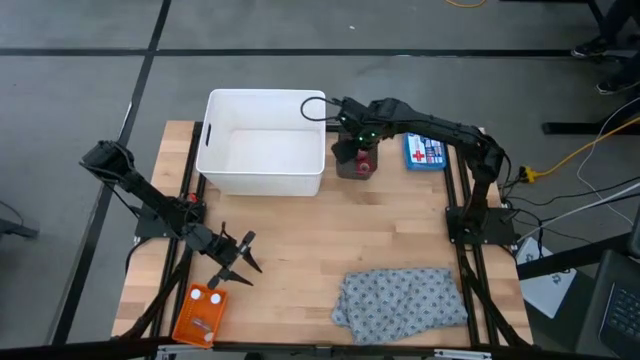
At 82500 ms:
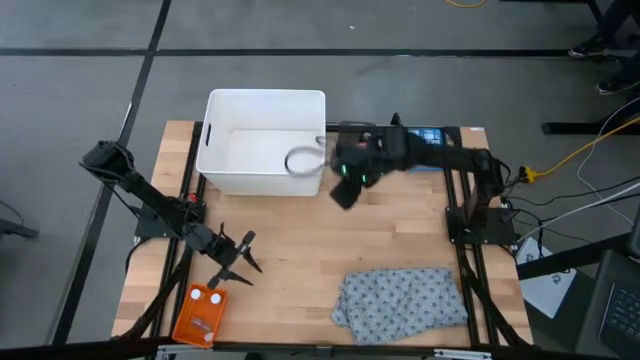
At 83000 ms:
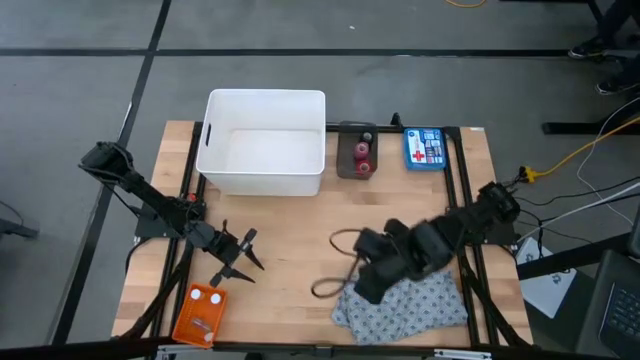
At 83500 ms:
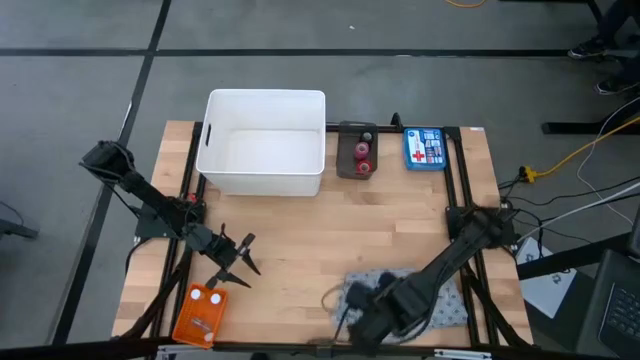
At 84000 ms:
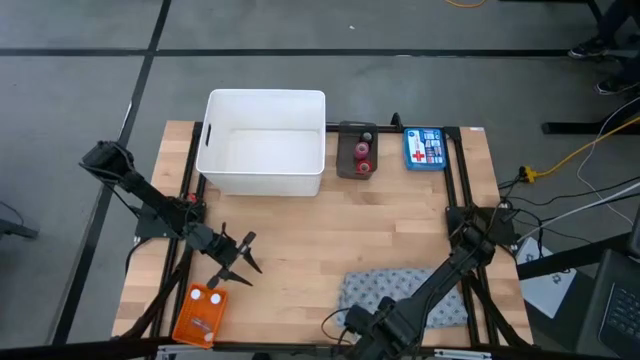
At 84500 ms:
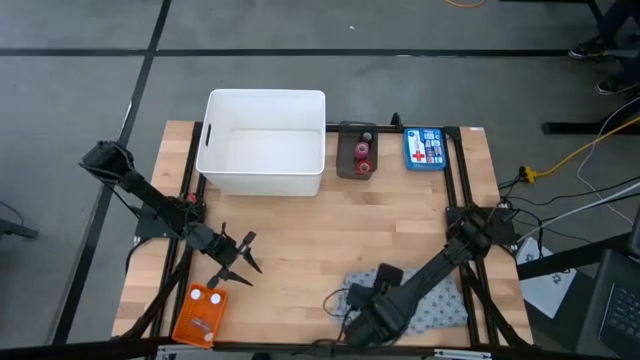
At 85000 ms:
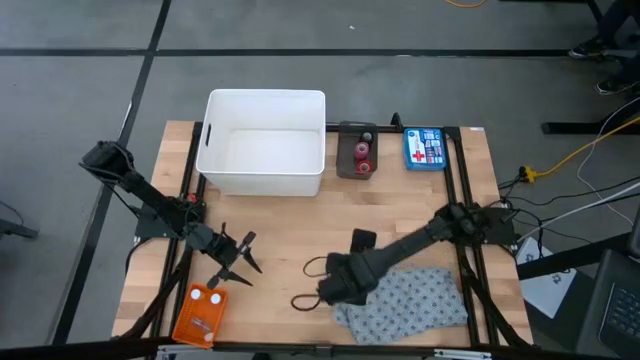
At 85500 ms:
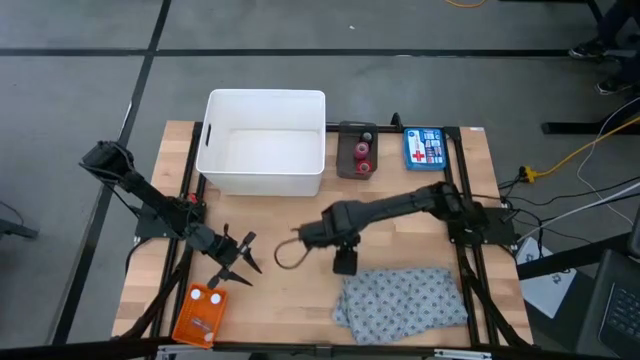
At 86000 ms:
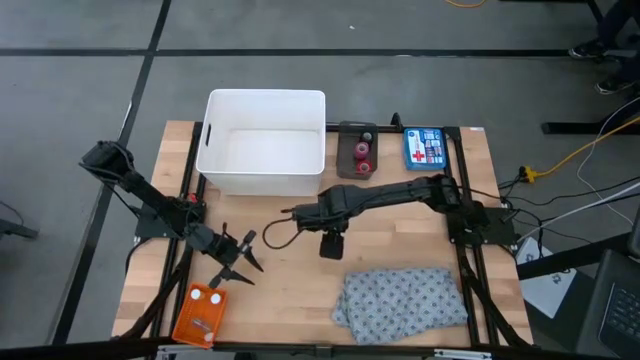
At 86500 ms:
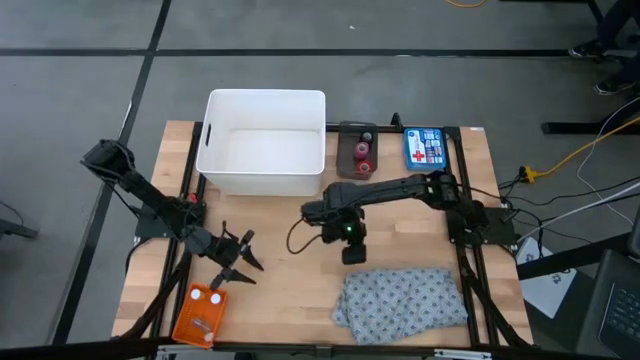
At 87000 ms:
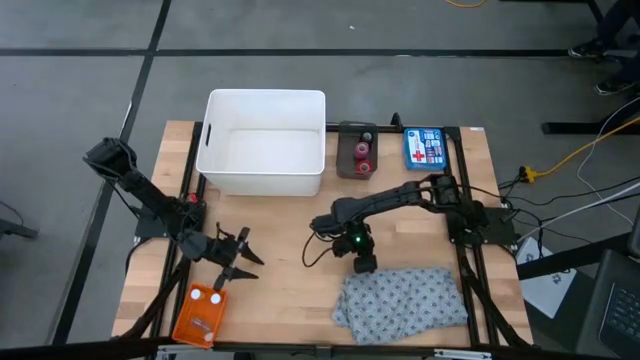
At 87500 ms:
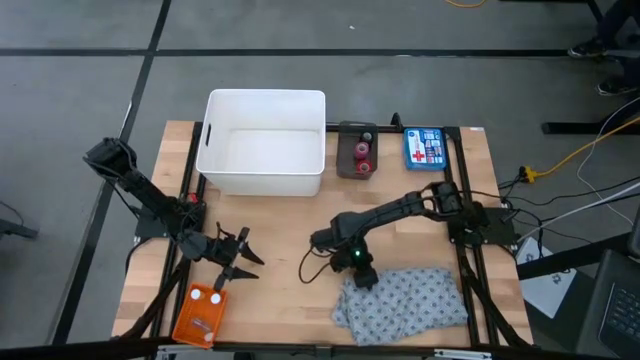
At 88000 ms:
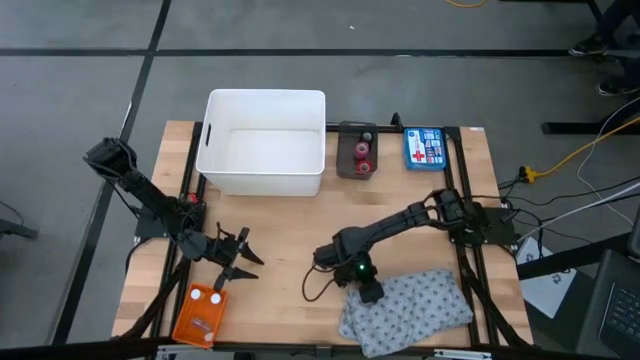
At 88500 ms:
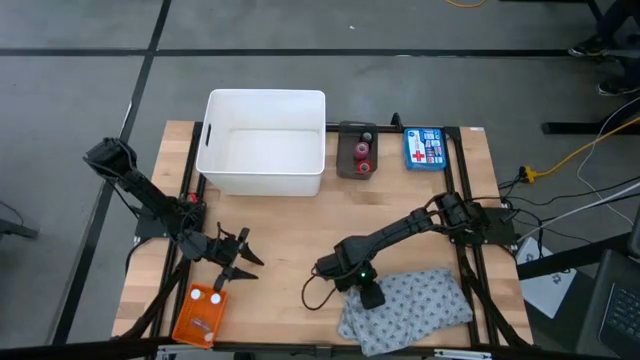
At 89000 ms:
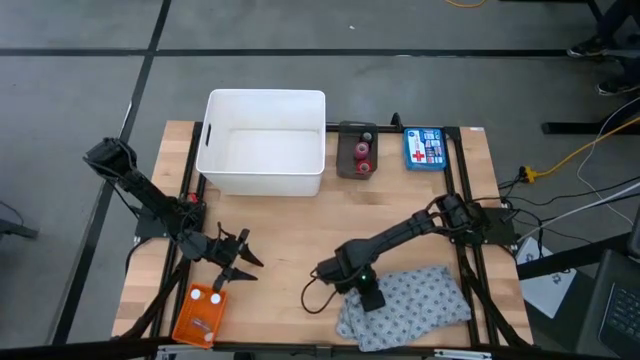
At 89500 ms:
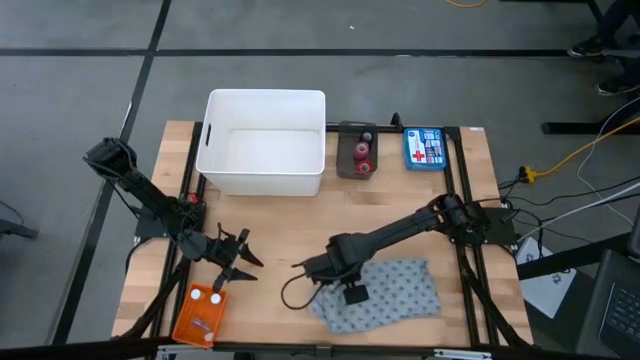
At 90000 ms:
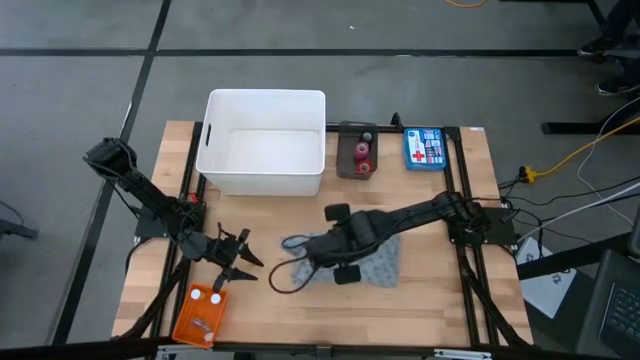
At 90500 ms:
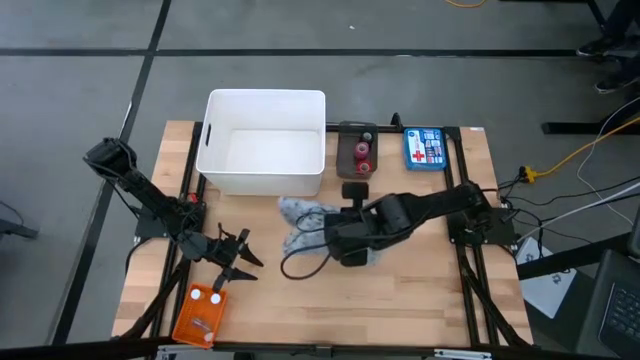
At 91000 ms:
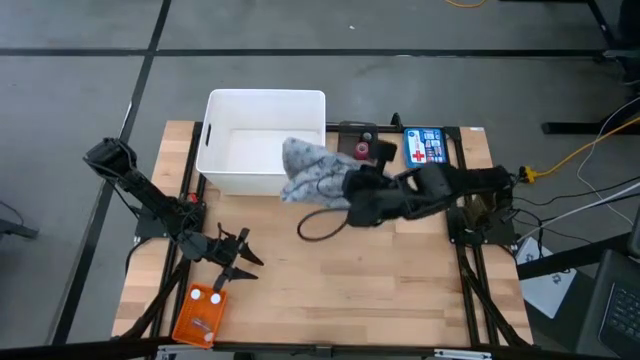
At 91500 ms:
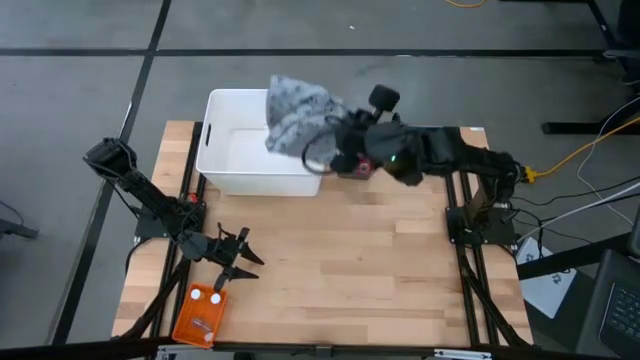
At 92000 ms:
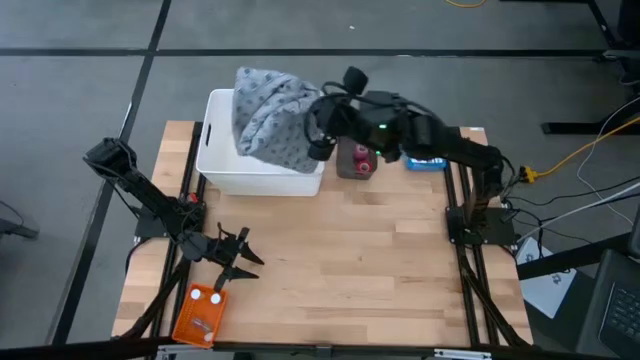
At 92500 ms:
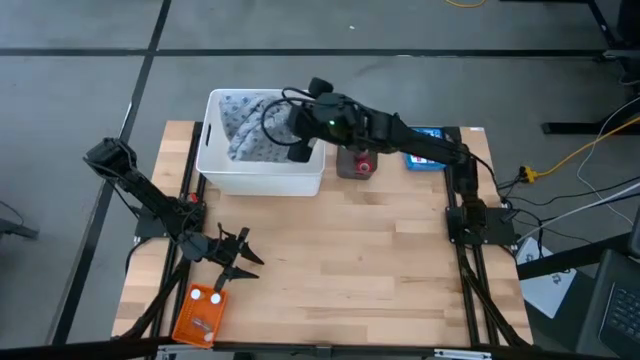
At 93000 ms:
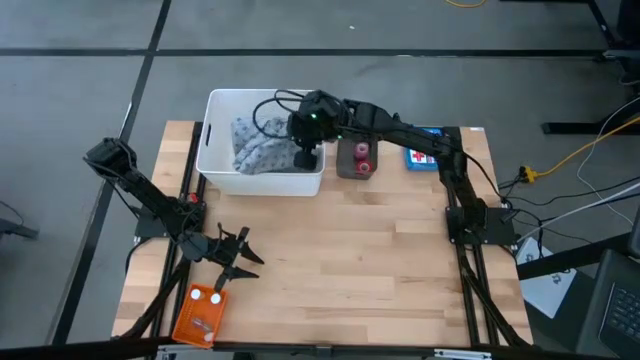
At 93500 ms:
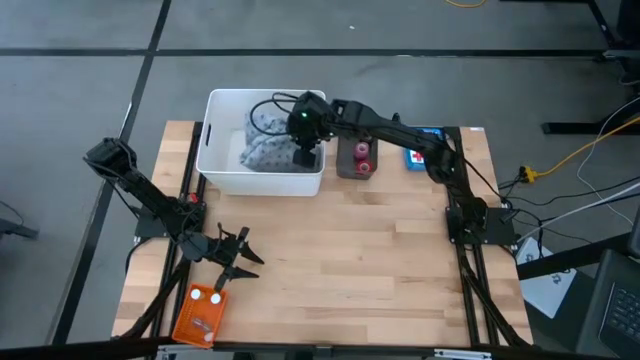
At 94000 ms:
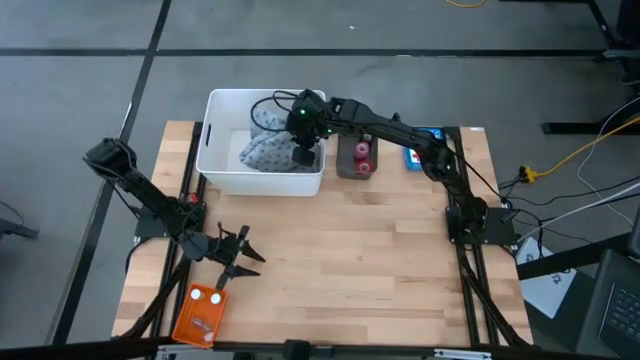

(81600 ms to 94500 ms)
Task: Pick & place medical supplies in basket/bin
Put the blue patient gown into the white bin

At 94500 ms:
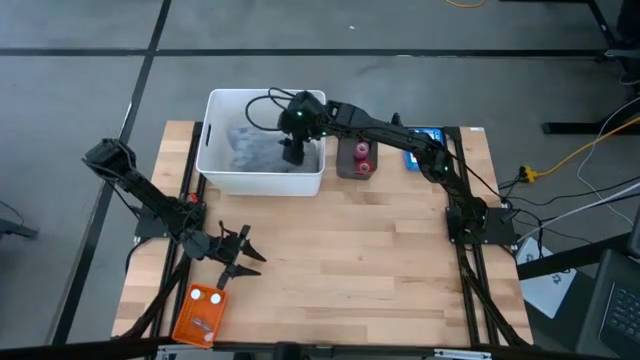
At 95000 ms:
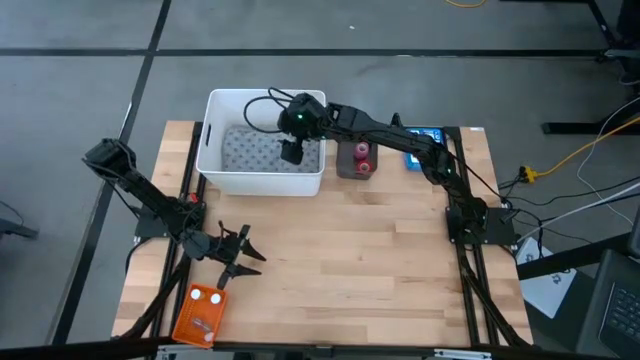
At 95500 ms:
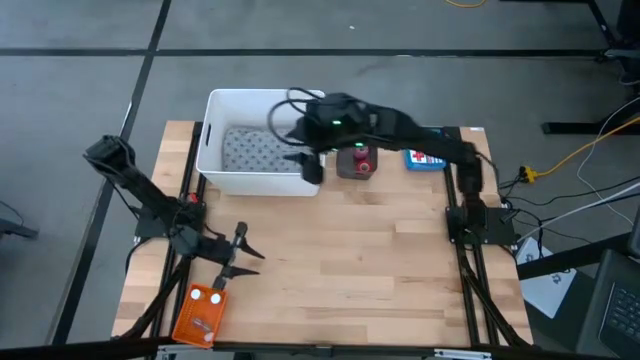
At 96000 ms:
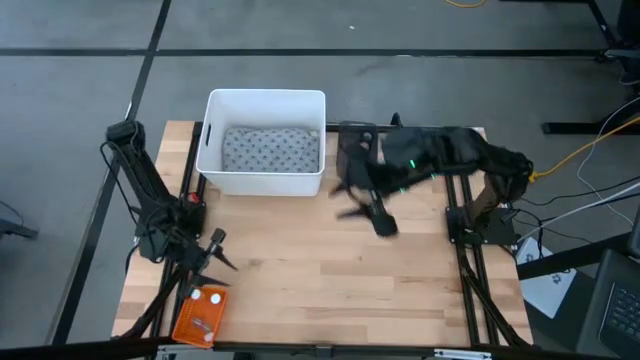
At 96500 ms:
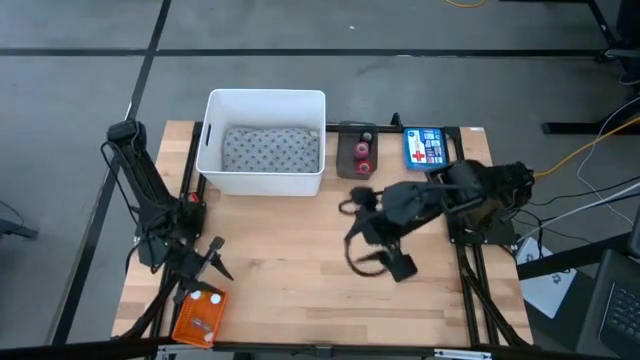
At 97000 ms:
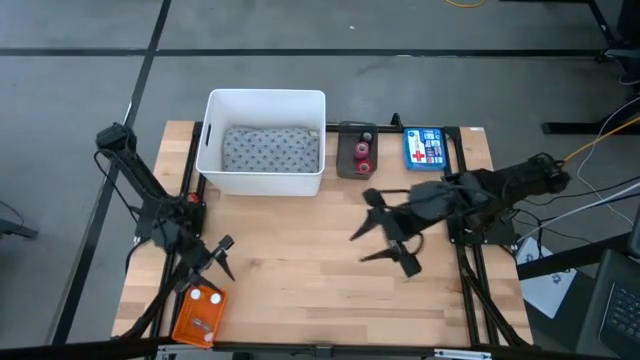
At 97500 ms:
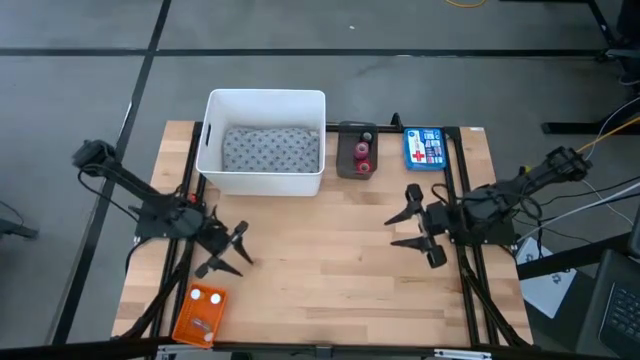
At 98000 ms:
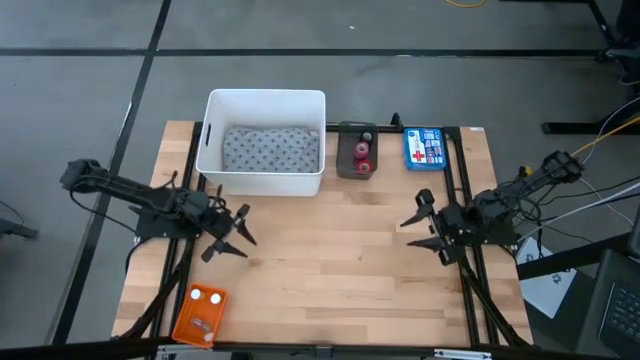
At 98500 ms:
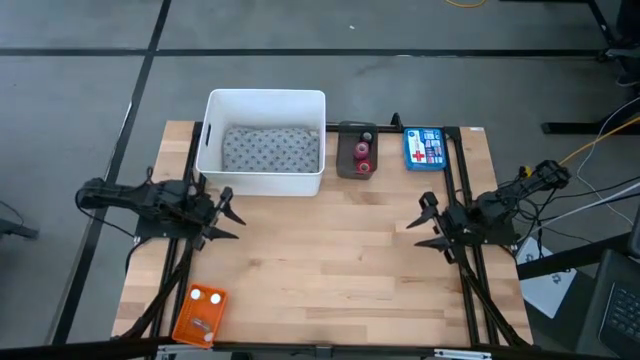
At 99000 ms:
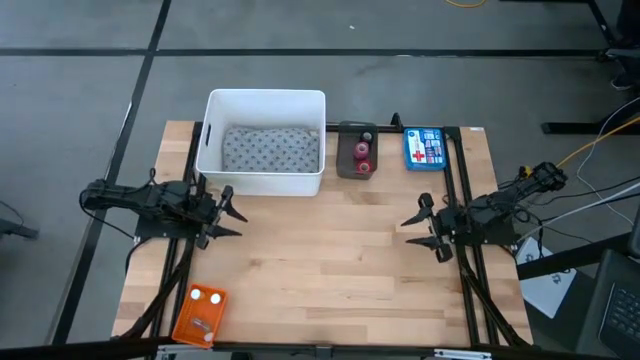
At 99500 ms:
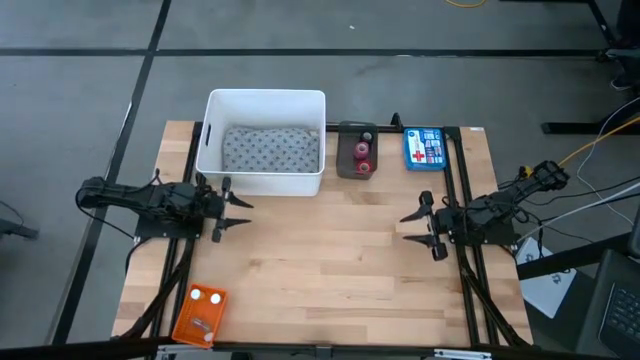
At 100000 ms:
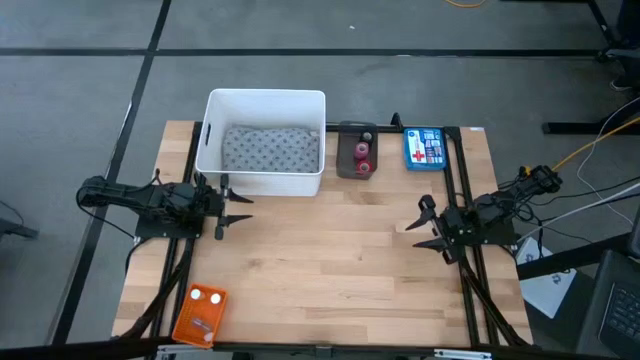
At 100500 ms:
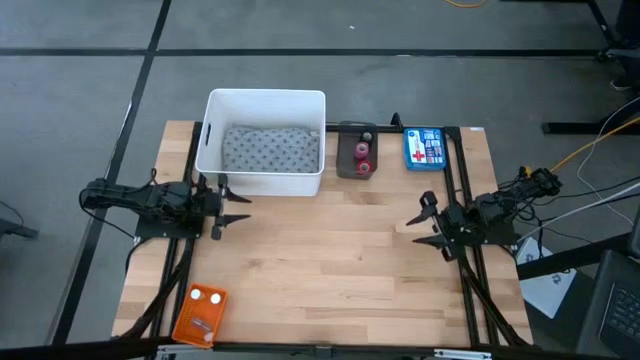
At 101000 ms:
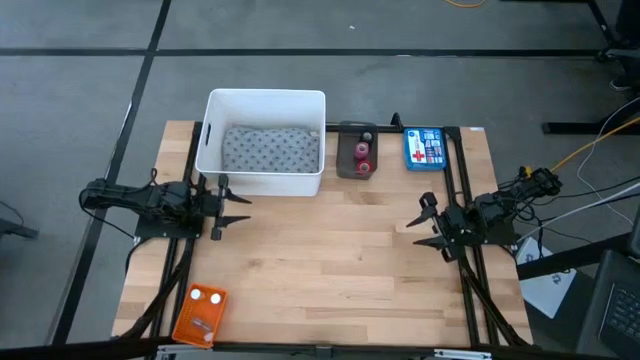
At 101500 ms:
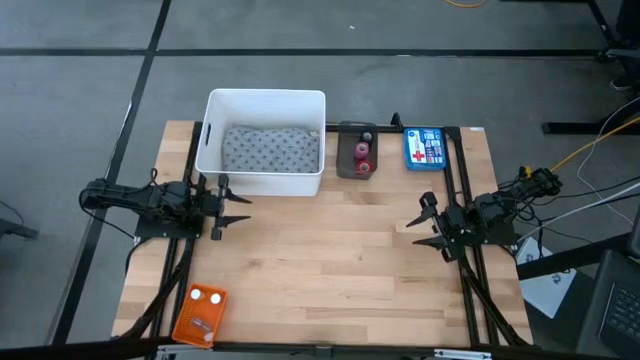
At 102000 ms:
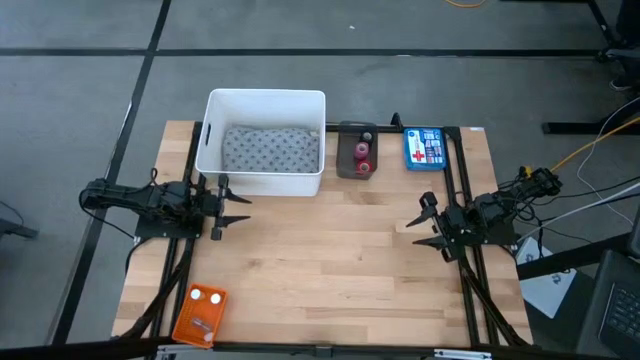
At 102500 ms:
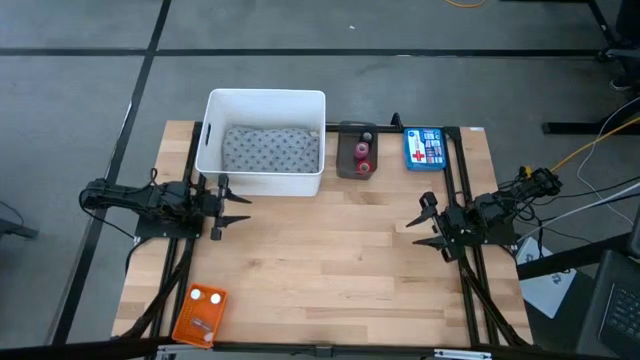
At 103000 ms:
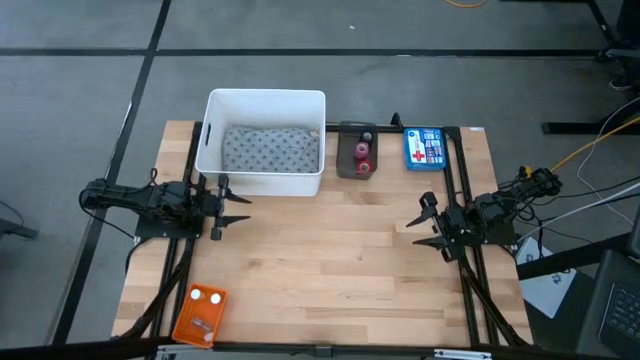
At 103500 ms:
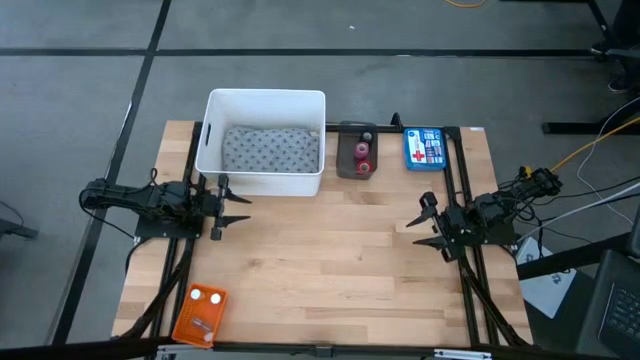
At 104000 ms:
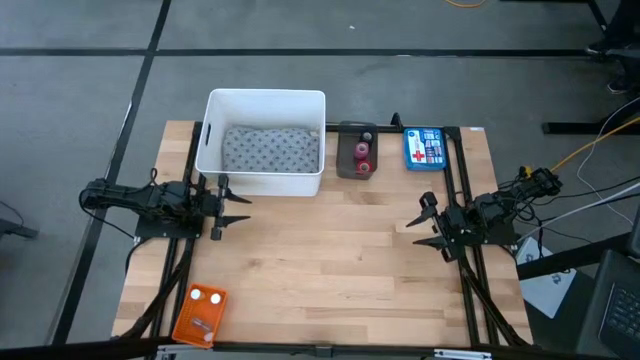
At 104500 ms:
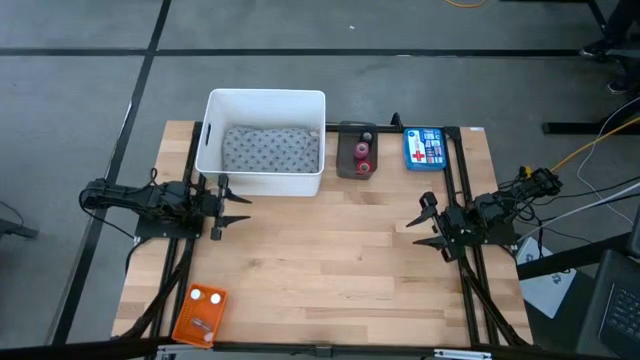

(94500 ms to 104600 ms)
Return to Home Position
